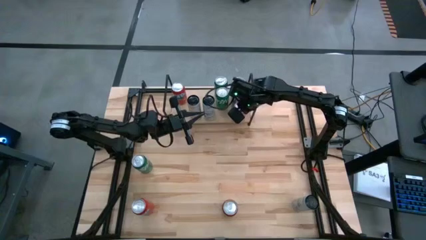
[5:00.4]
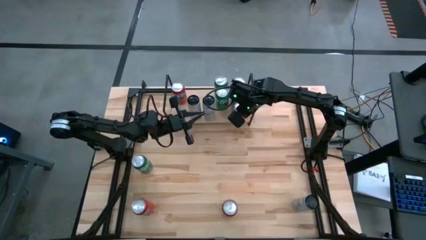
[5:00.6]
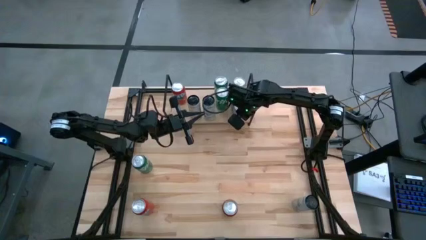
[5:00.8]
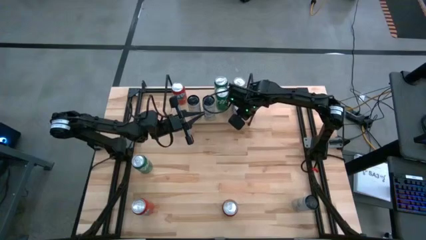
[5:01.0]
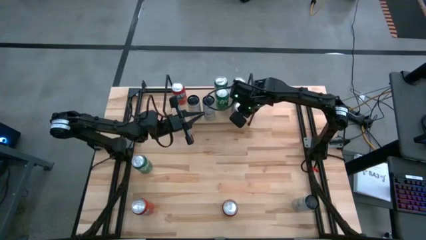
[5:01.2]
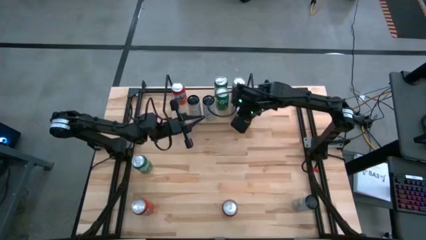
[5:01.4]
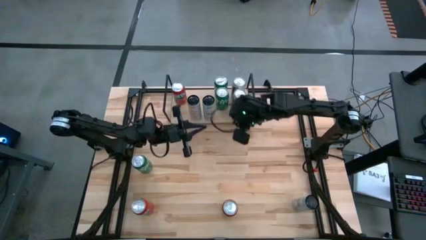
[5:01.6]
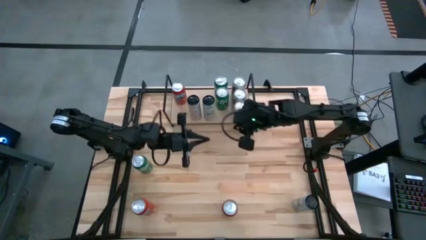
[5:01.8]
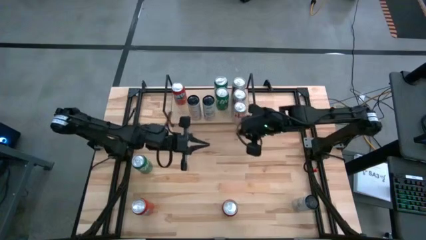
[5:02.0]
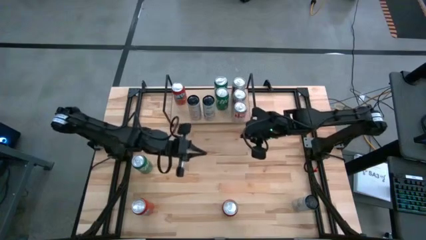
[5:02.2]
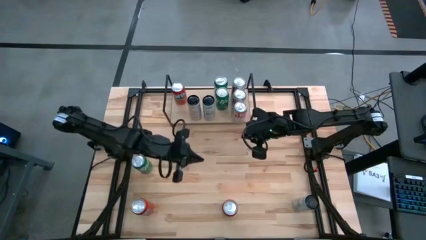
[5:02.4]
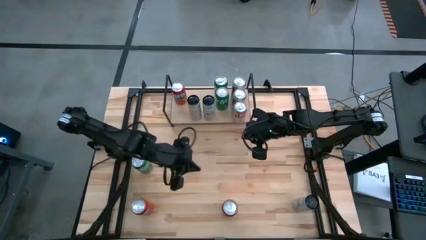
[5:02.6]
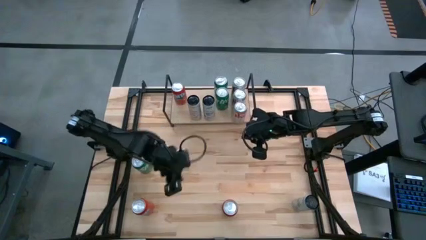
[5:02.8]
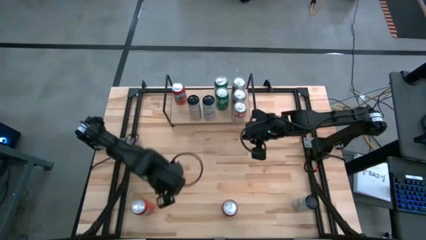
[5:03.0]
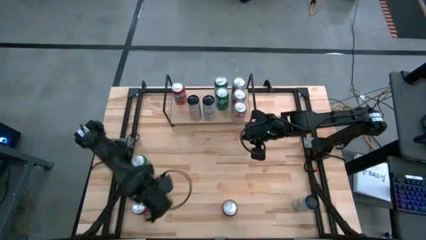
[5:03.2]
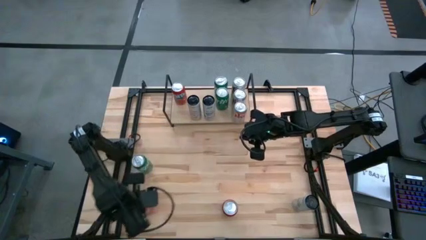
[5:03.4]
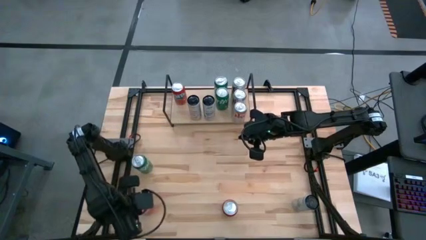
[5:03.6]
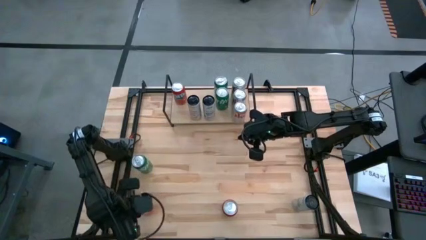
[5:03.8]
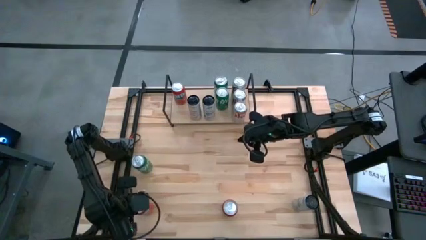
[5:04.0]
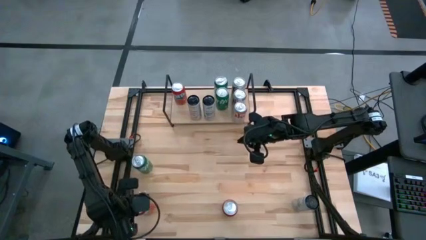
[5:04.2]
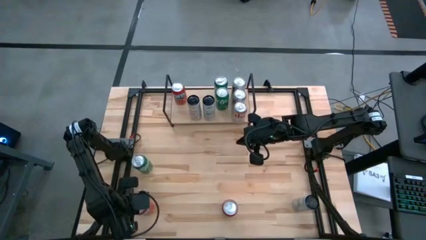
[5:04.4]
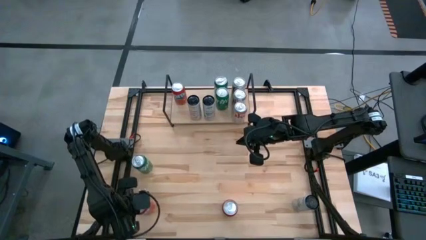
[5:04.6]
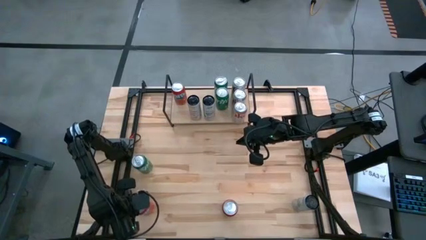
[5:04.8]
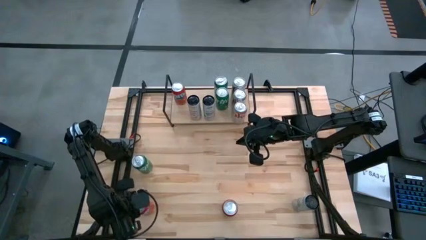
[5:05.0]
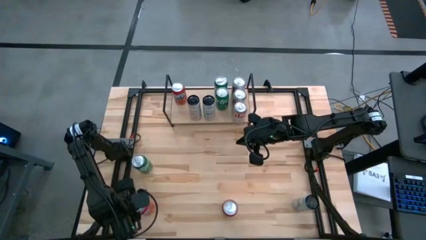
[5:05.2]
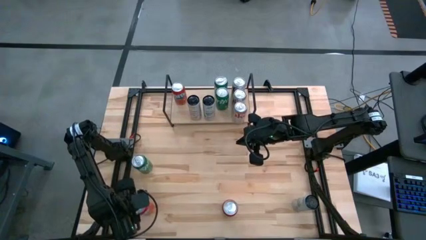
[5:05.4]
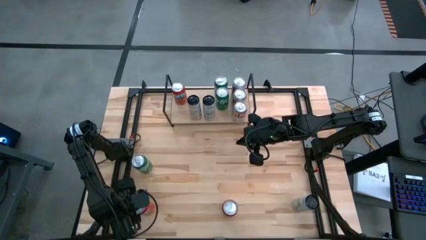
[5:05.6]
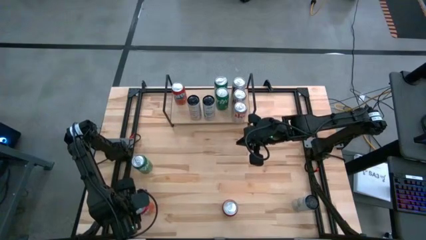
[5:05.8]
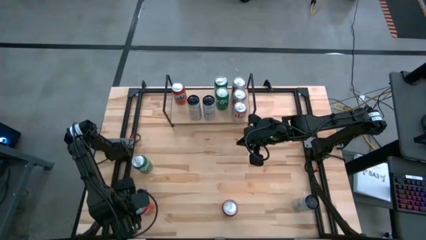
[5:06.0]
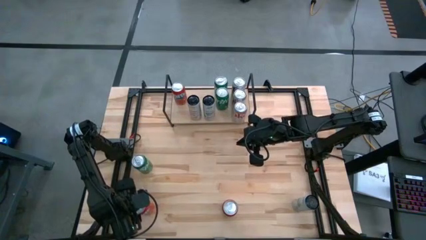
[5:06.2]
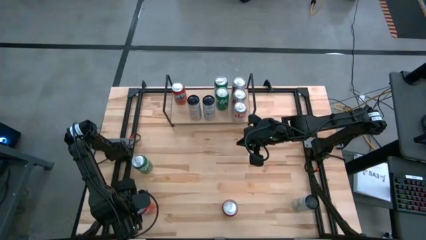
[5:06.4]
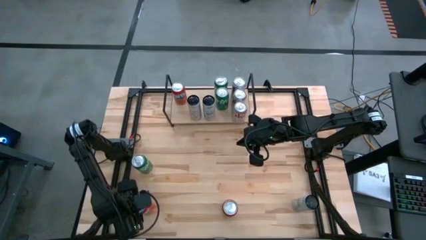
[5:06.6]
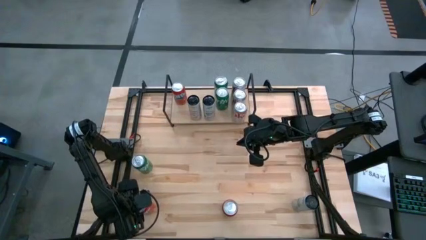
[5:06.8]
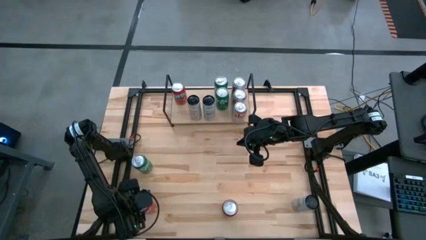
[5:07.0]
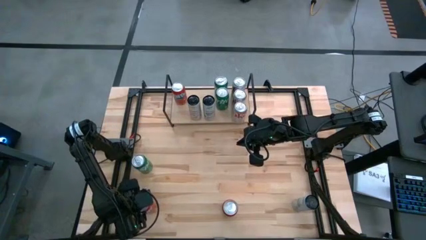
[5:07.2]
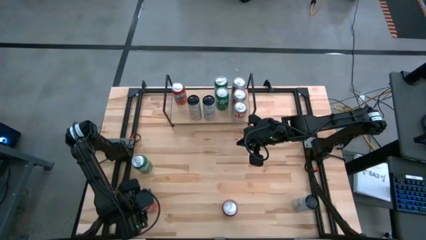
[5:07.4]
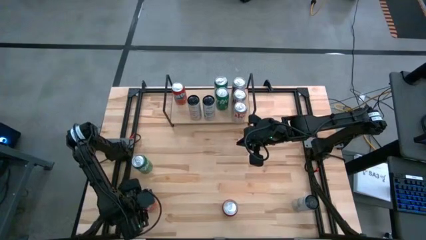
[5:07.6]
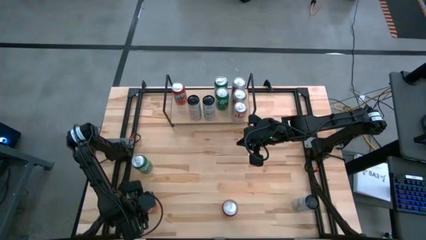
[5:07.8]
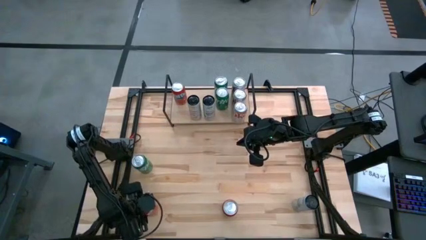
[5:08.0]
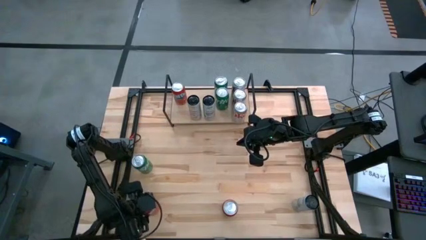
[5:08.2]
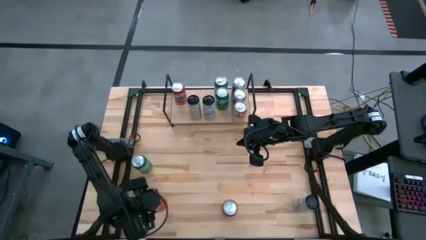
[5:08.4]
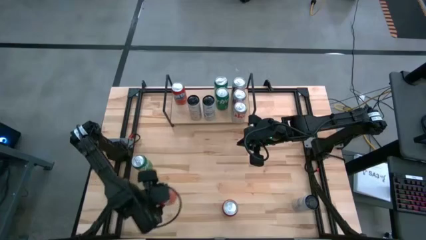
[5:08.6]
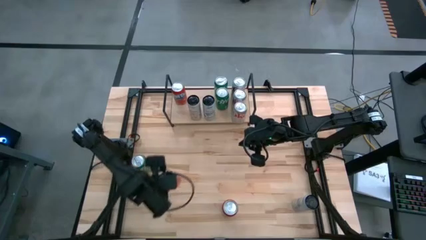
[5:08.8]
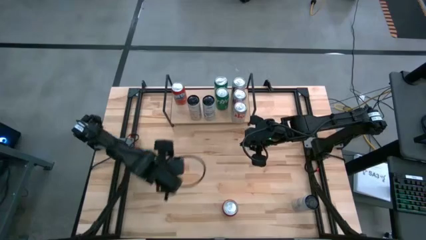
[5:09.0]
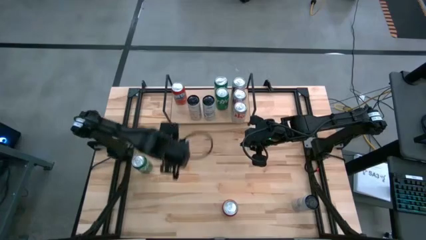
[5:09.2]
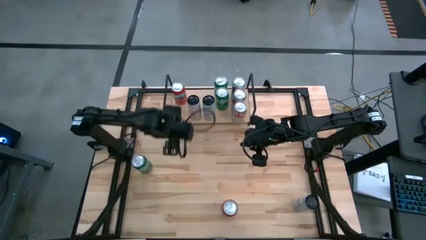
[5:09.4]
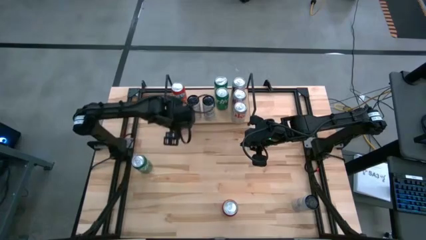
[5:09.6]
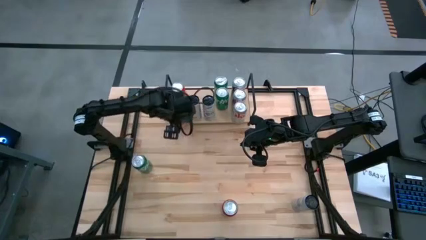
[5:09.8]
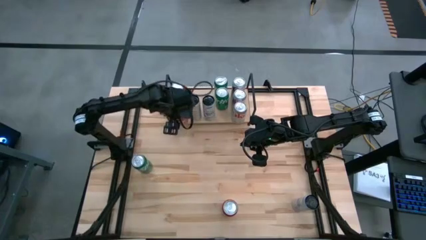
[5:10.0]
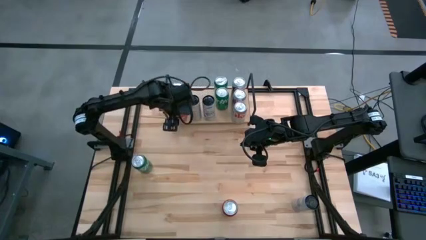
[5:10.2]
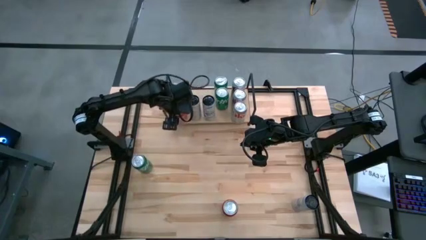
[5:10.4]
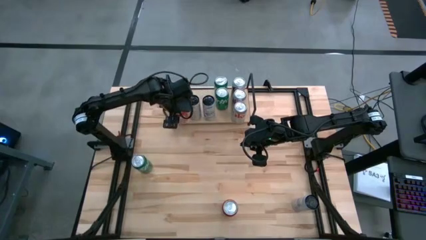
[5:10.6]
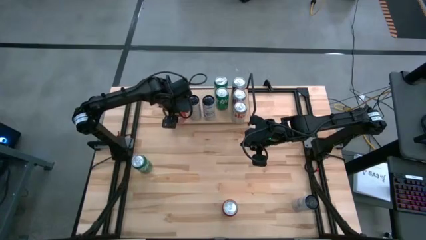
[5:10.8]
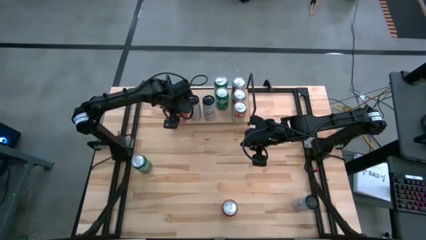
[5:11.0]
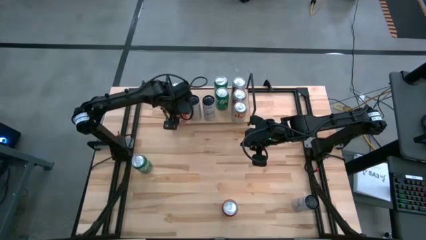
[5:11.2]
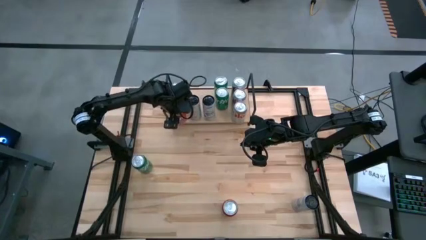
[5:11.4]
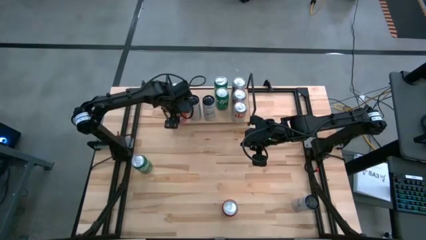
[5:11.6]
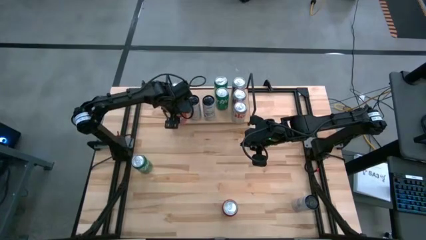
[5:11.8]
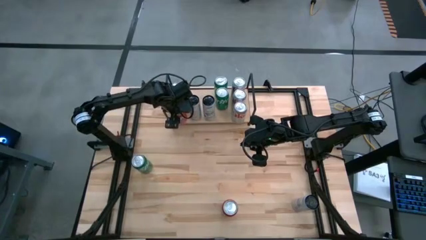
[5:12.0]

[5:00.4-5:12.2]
Task: Sort soda cans
Put the left red soda can on the shelf and align it with the other red soda can
